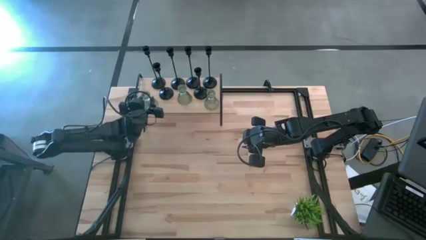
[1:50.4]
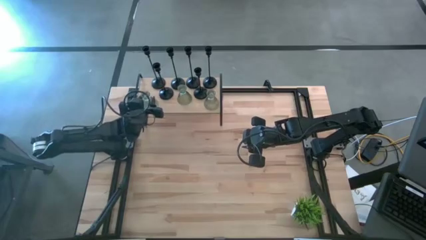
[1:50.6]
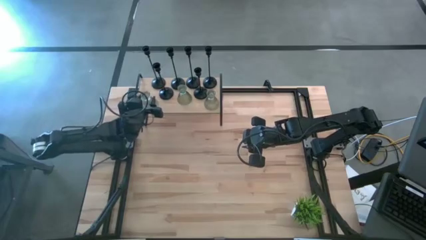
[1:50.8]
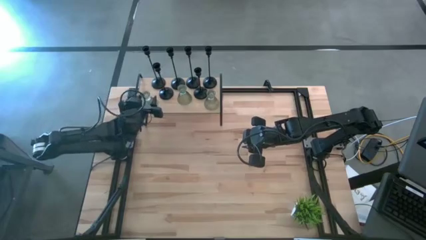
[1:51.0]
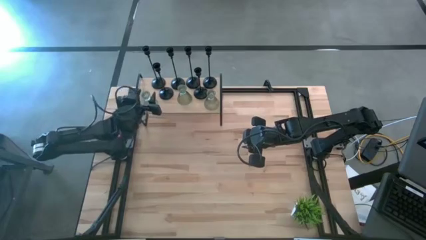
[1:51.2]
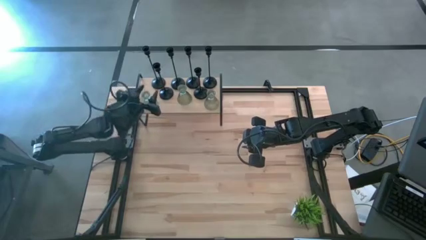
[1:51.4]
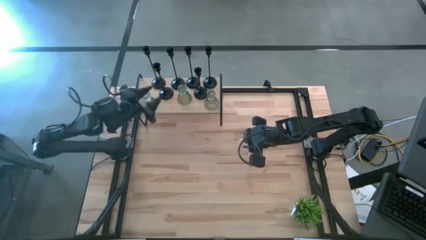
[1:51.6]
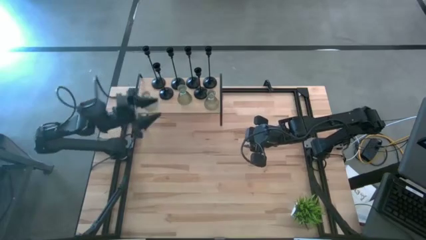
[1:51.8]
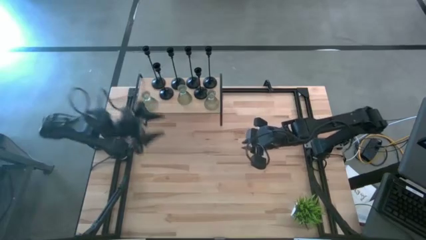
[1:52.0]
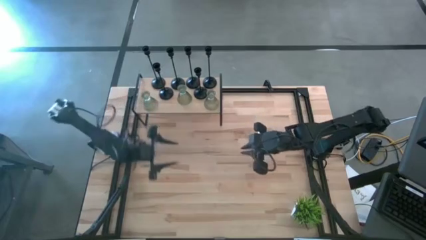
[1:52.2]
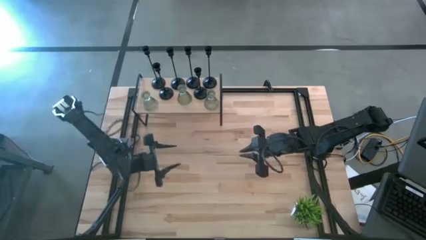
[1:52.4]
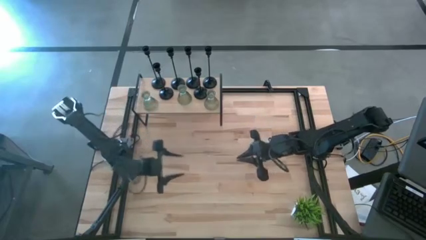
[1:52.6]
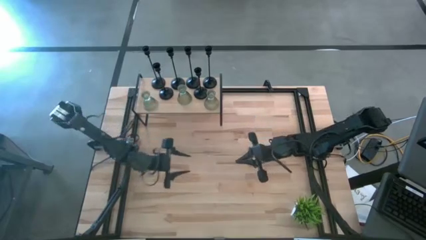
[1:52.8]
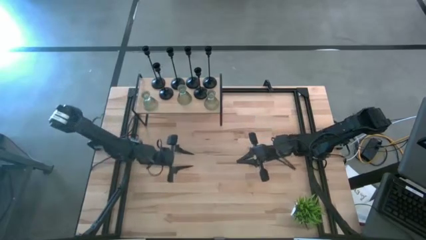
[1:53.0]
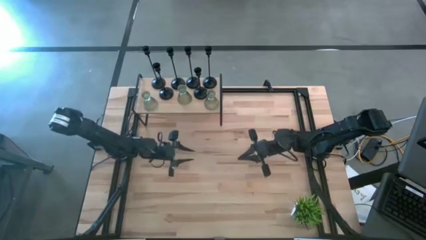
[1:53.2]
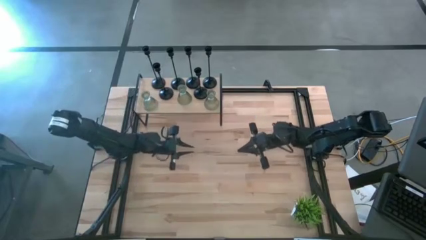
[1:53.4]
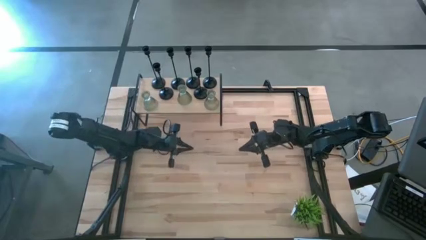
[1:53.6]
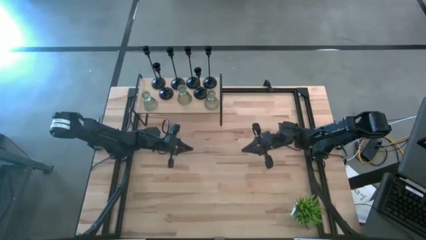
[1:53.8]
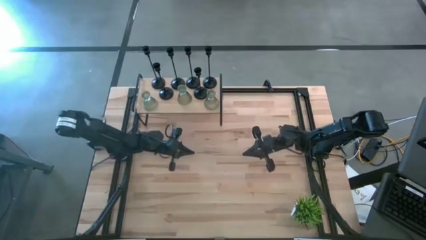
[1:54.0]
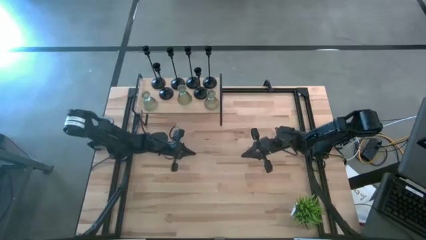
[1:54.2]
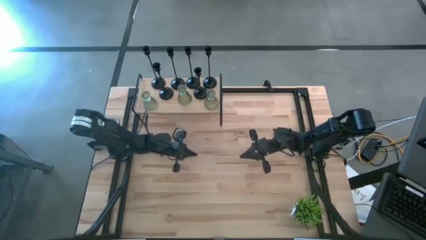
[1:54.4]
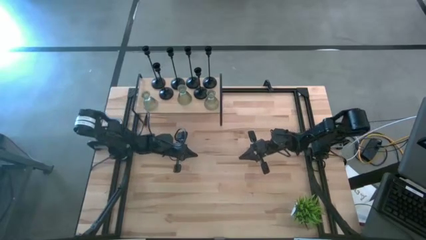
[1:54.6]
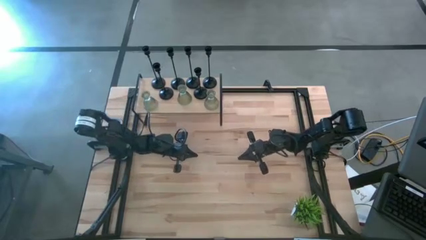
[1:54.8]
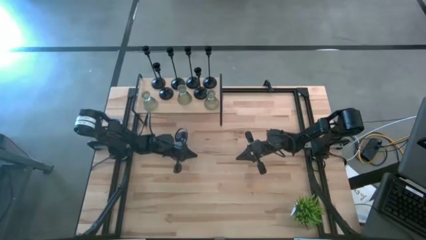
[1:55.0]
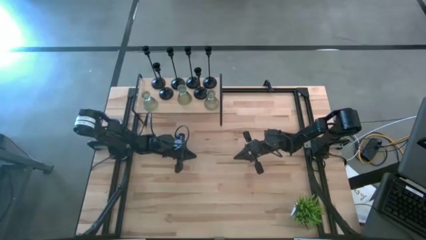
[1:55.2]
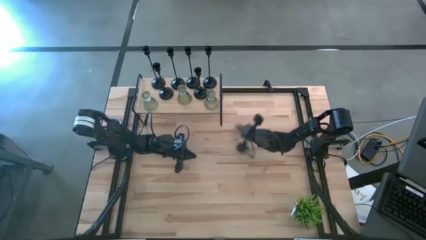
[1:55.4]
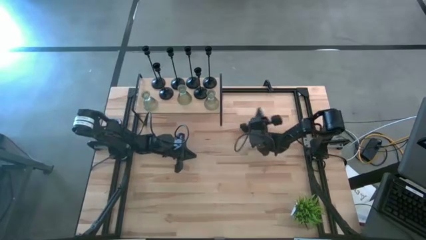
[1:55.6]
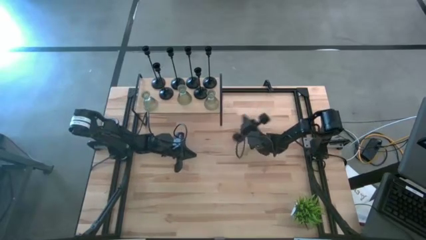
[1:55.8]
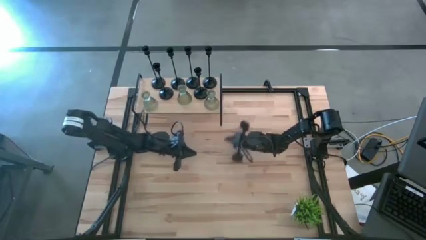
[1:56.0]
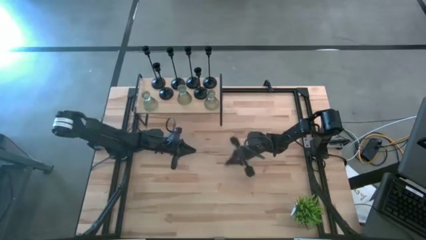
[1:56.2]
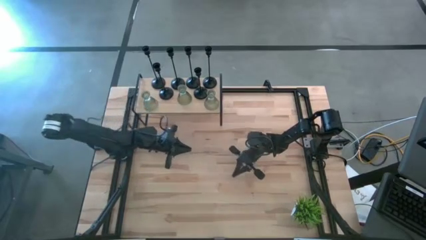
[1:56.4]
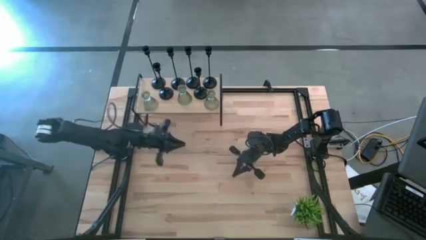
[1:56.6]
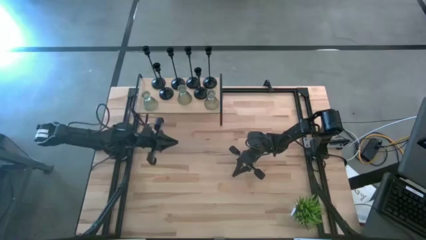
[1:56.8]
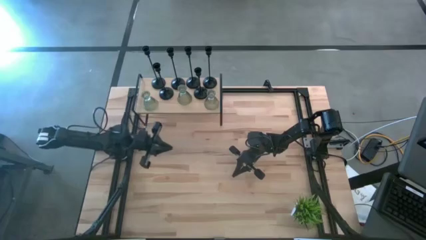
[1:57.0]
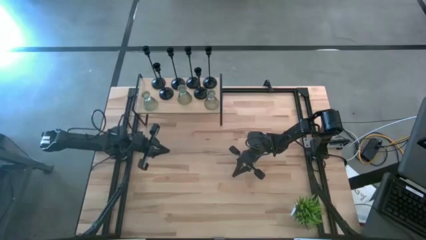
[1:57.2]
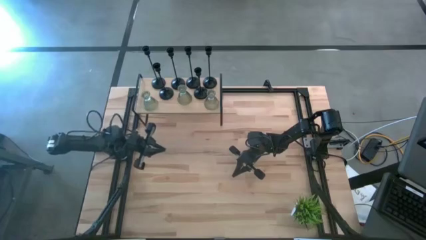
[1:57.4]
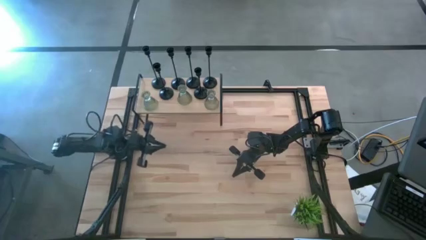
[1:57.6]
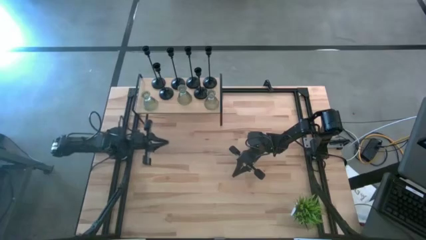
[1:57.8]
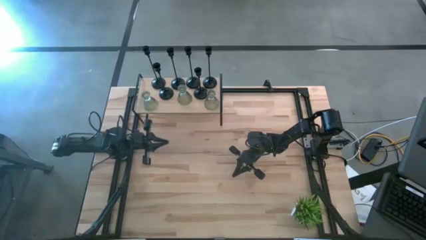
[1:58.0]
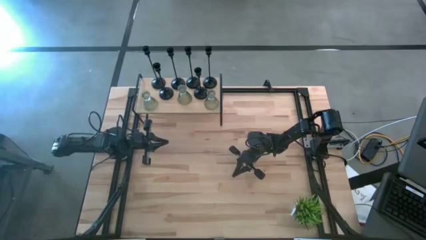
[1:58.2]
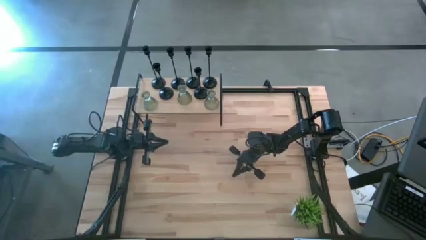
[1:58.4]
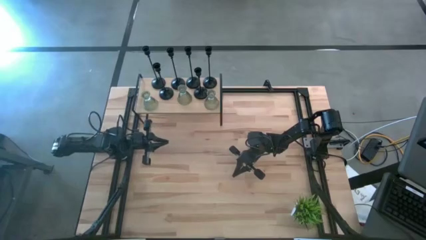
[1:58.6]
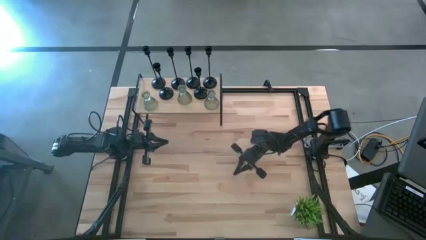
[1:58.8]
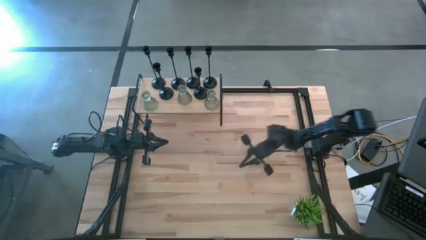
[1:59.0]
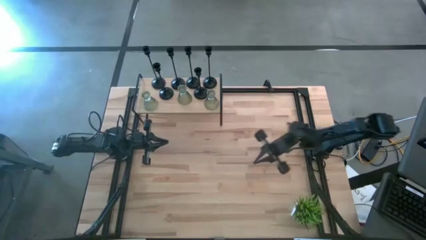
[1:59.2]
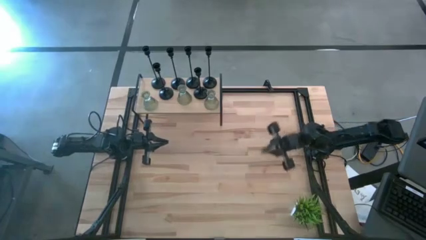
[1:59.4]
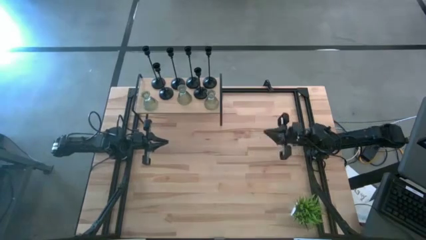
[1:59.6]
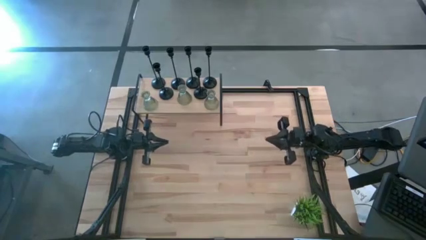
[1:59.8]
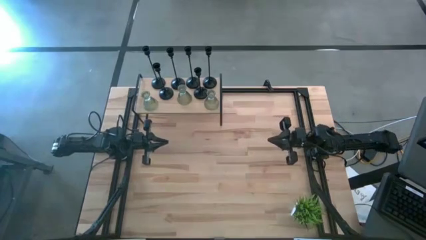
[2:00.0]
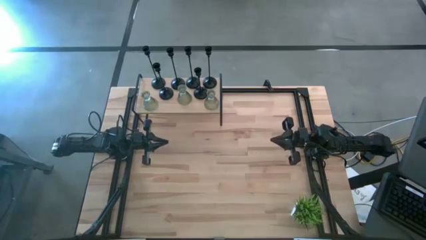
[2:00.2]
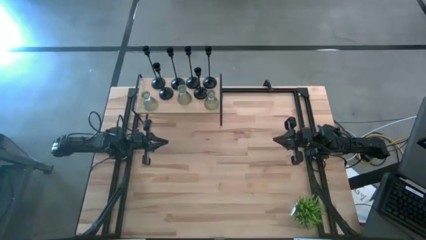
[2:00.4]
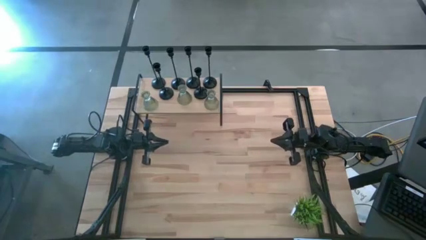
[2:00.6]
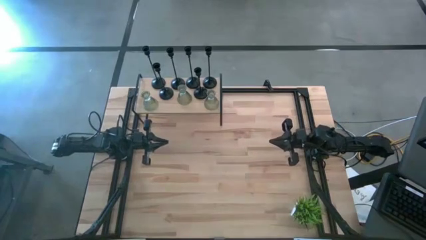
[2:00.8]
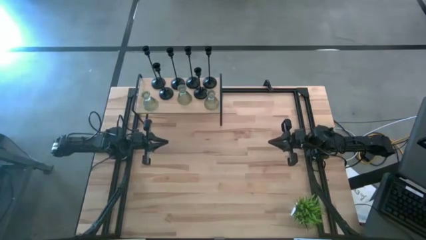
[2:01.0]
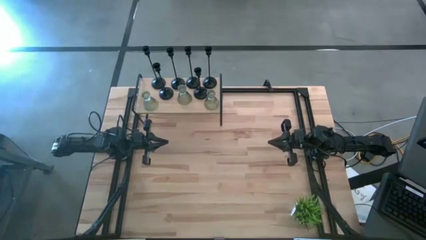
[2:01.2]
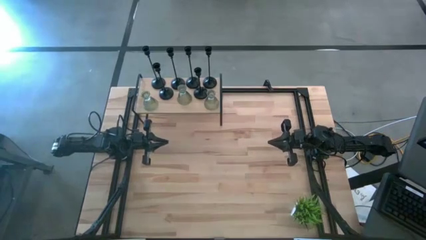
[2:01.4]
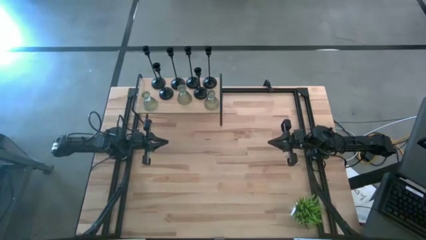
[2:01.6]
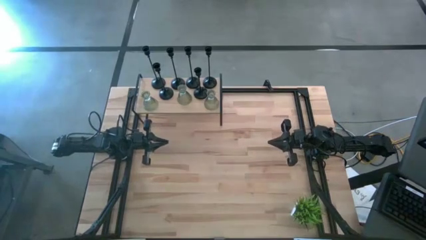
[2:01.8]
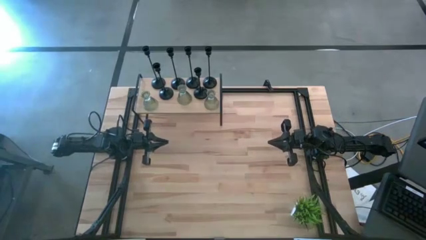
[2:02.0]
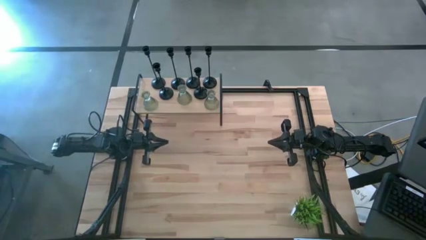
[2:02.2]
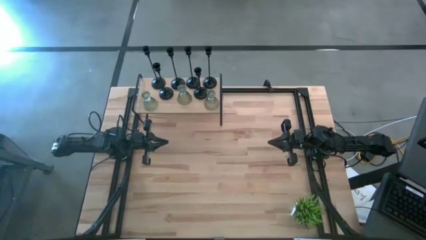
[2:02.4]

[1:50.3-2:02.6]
Task: Pick & Place candle stick holders
Return to Home Position
